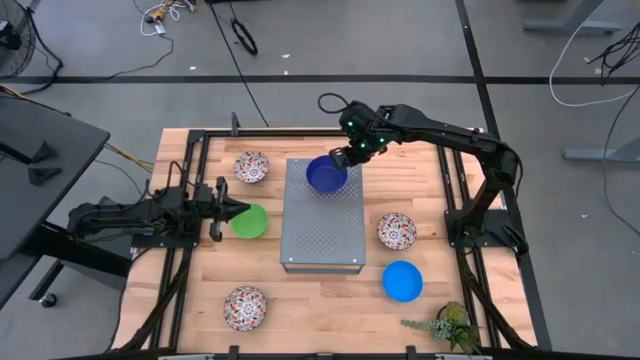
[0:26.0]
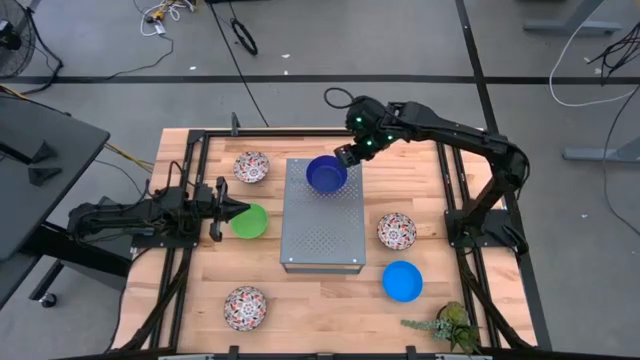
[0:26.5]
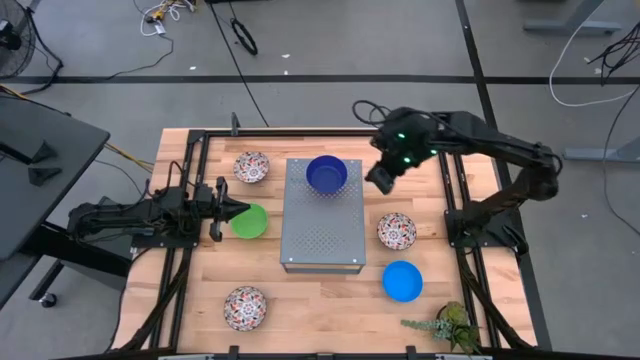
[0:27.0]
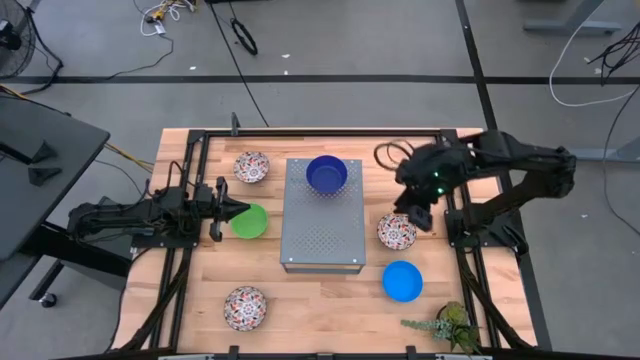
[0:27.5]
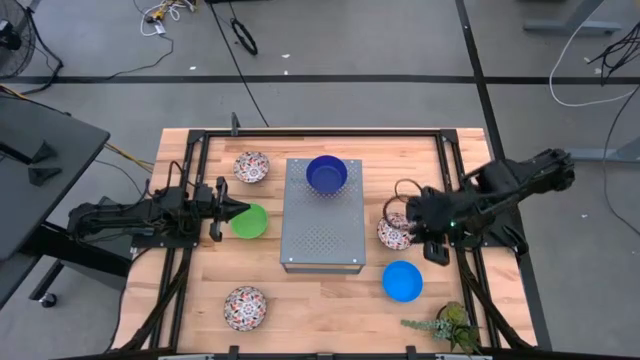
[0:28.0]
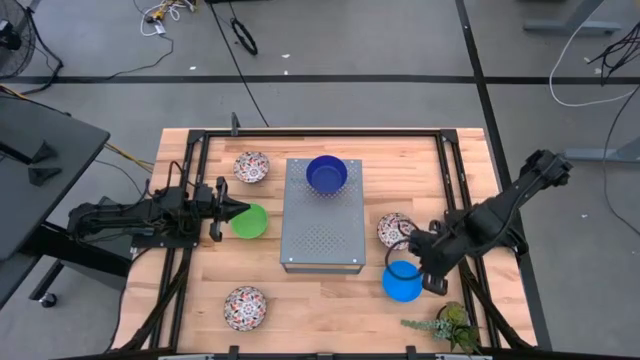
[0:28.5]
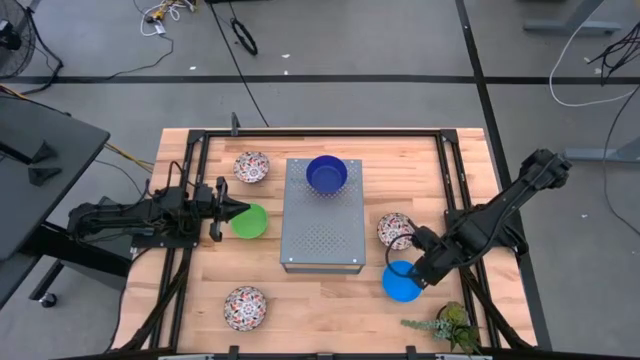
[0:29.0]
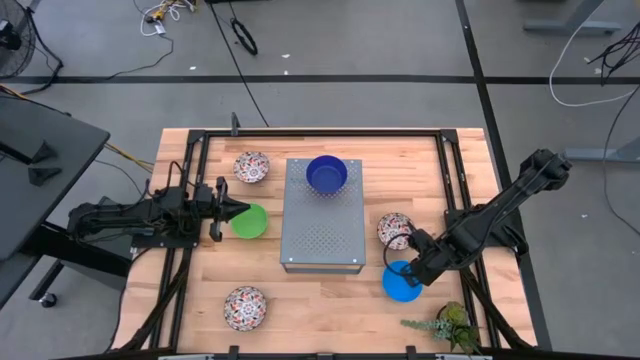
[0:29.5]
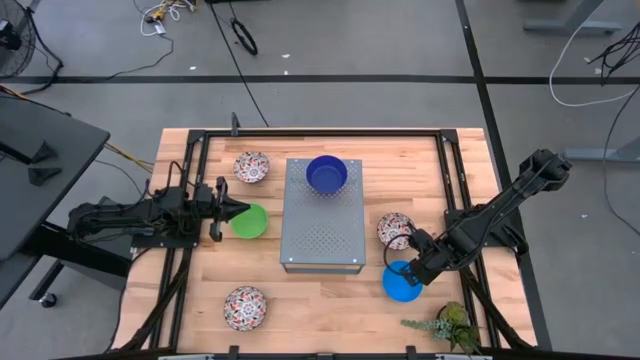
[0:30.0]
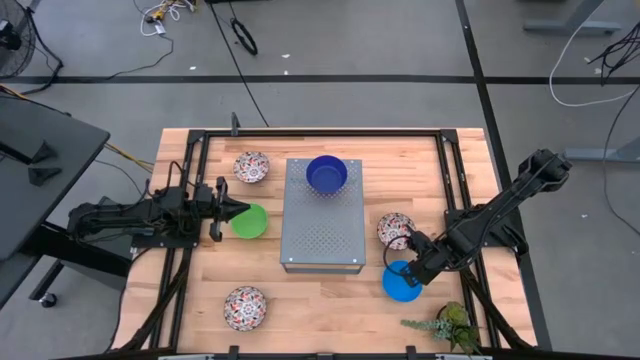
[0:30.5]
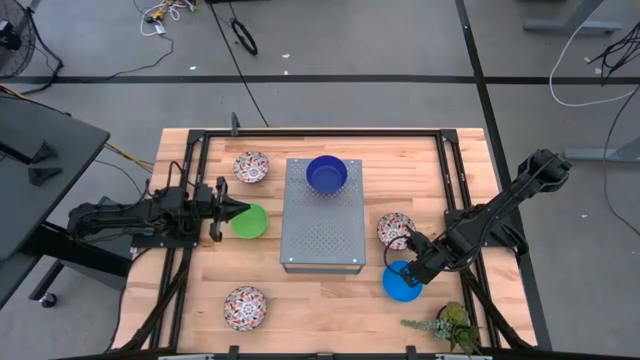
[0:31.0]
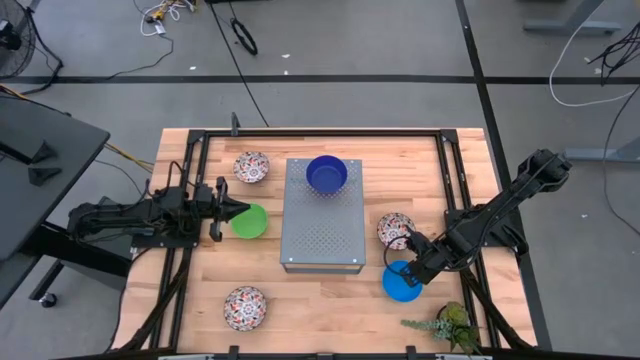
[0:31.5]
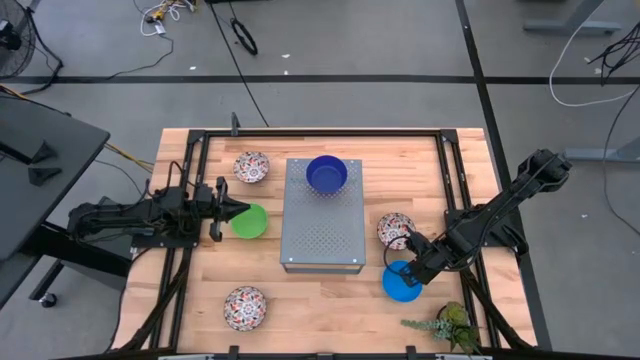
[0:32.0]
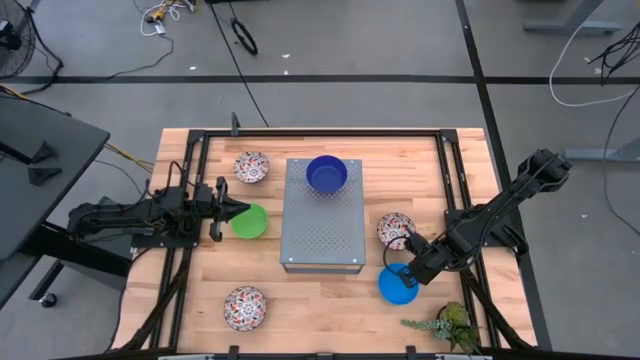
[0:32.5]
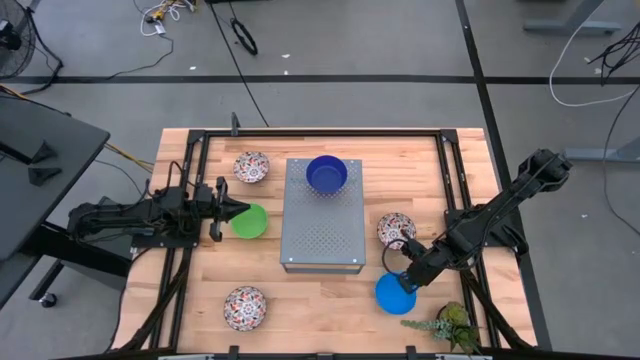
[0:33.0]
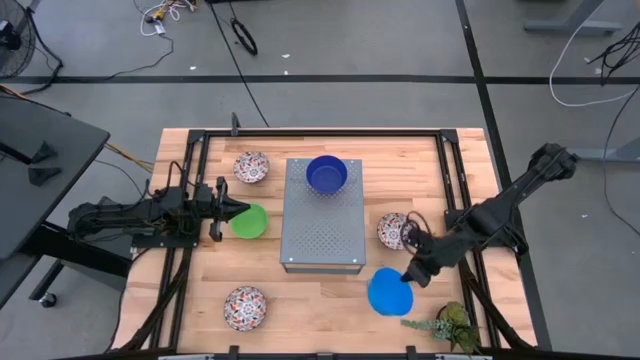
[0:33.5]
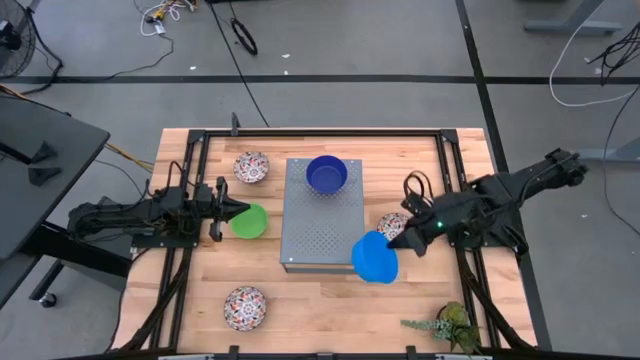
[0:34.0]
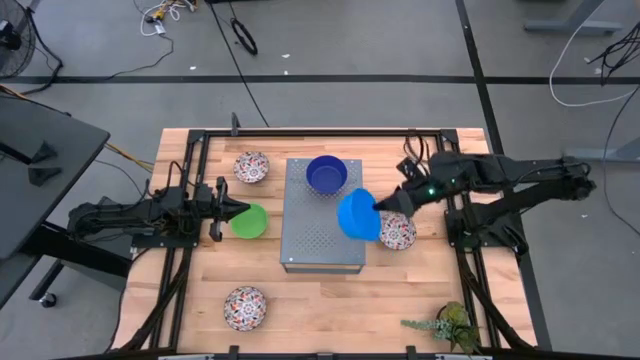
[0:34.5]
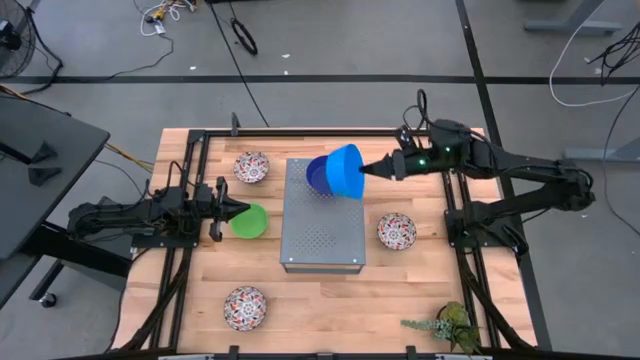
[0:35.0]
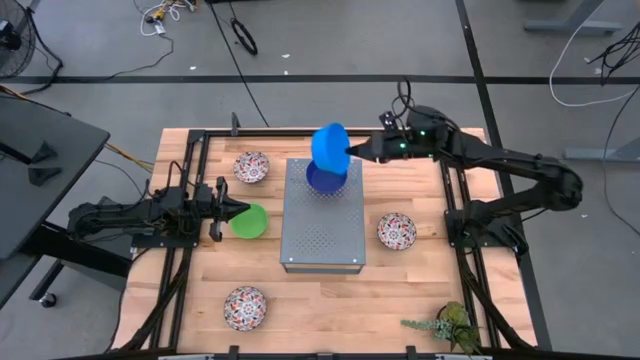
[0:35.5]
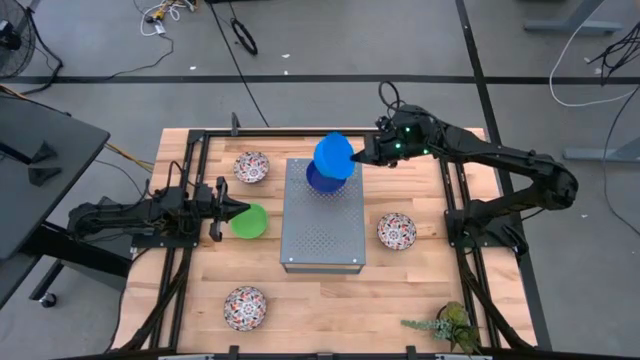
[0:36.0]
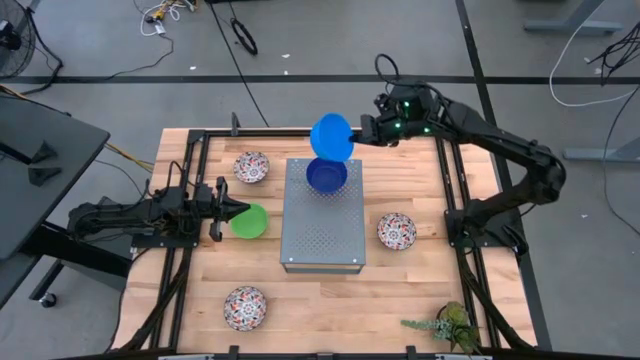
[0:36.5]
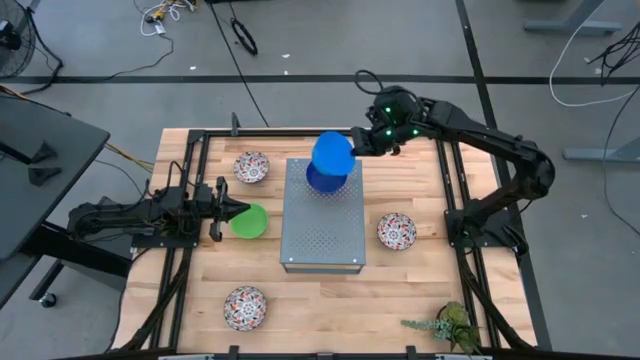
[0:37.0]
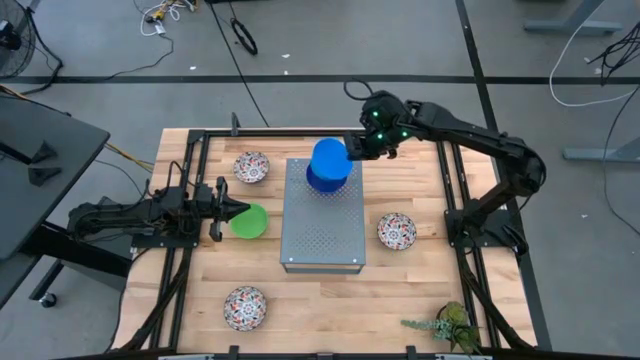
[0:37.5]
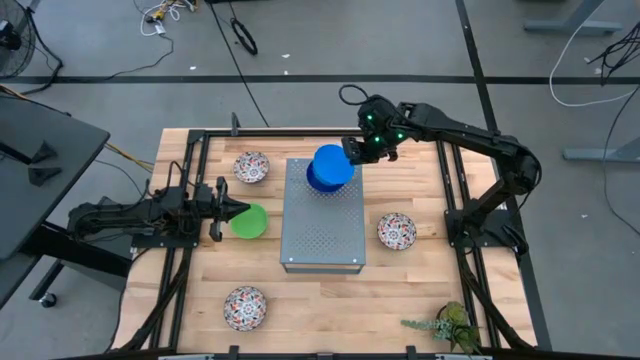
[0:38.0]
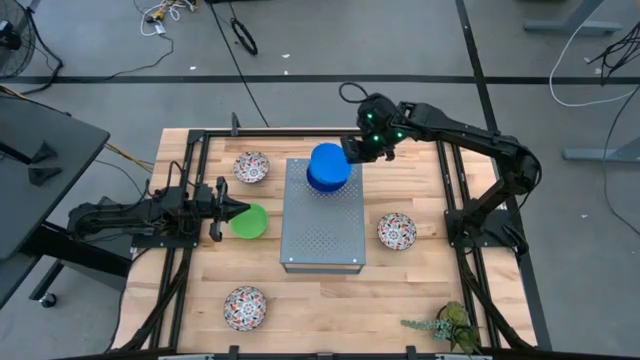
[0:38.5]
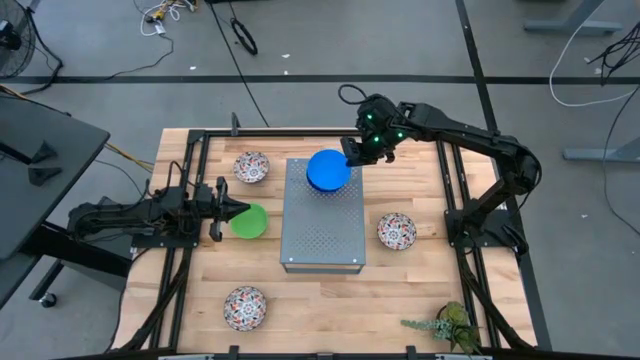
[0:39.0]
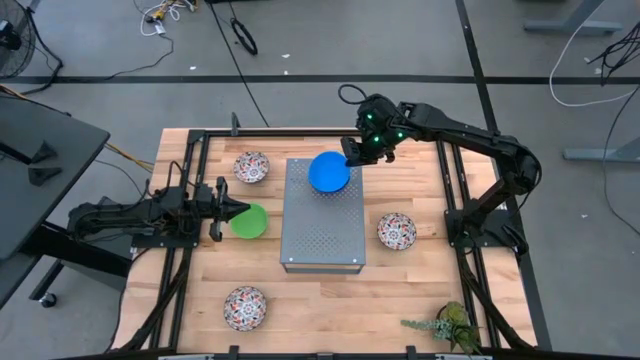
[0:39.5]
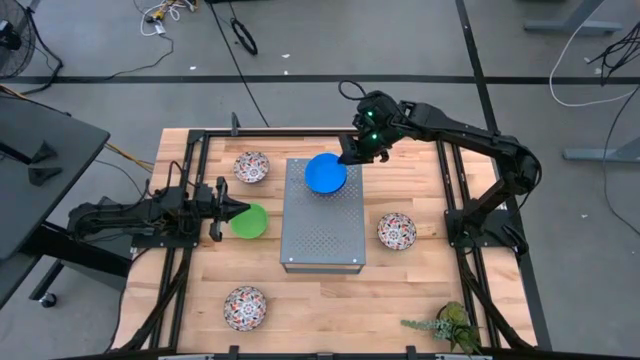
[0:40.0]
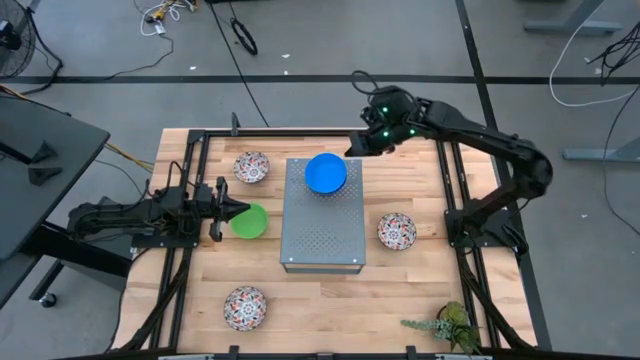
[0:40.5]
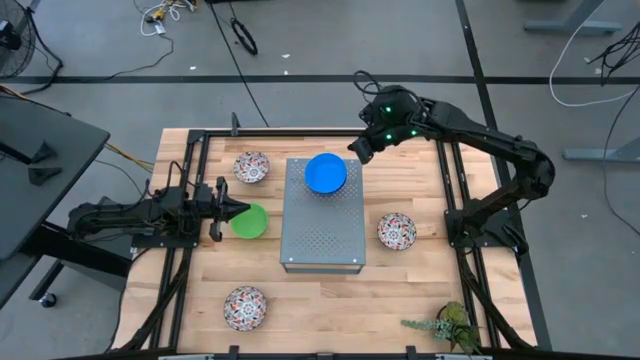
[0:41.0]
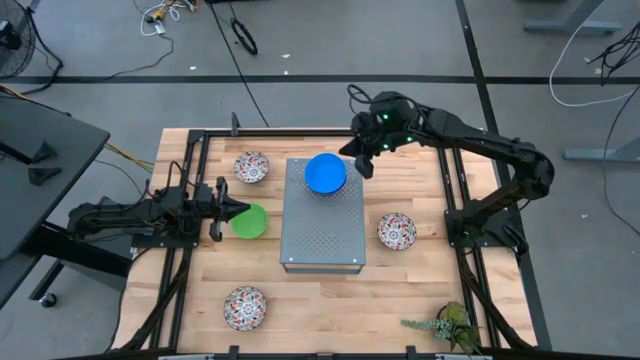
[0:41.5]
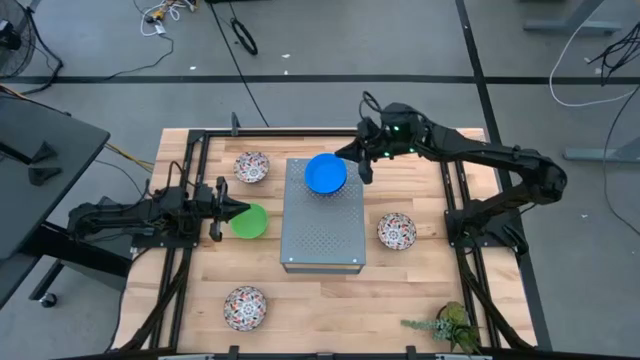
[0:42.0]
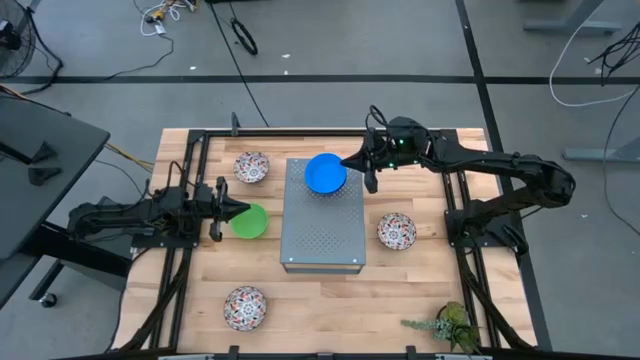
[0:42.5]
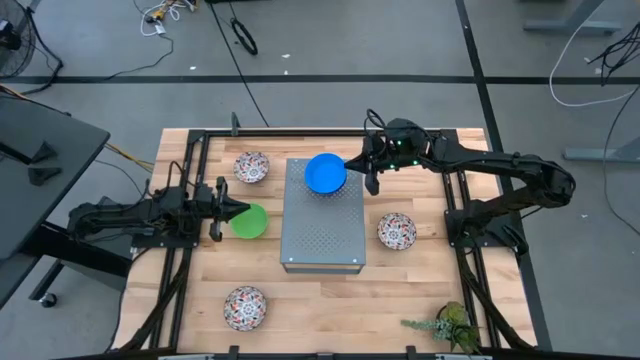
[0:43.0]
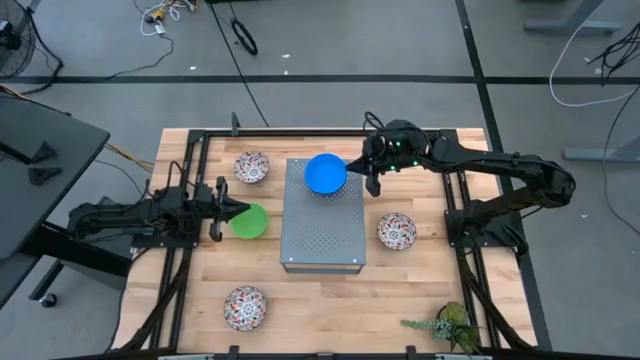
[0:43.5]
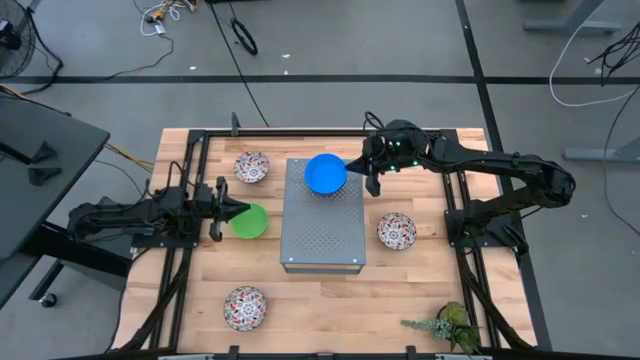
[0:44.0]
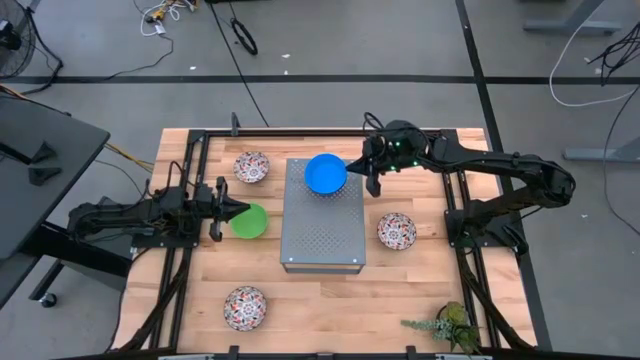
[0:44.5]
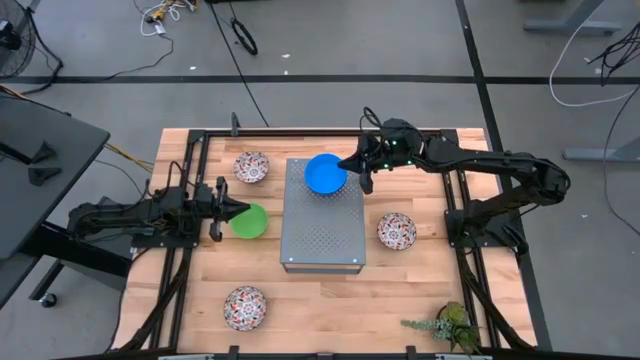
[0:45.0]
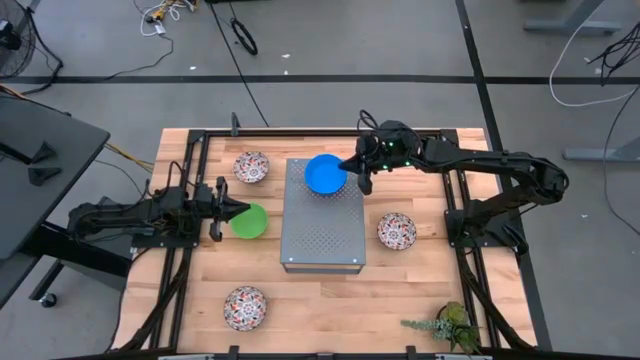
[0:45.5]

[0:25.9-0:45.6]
Task: Pick & Place Mini bowls
Stack the light blue bowl on top of the dark blue bowl on the shelf
